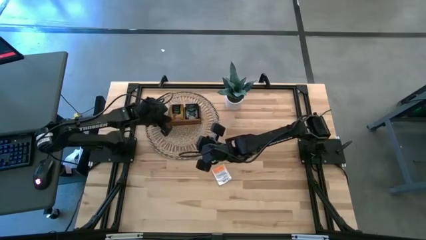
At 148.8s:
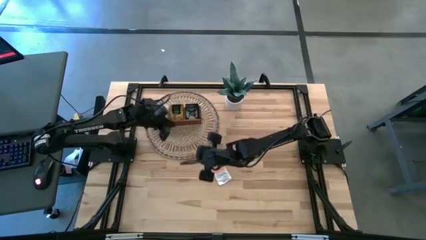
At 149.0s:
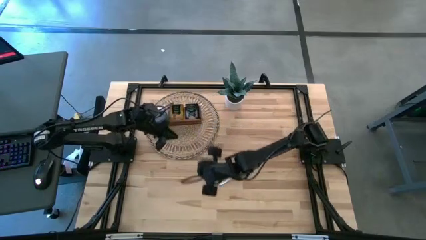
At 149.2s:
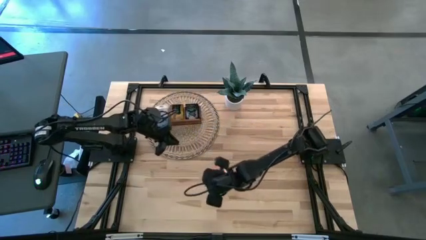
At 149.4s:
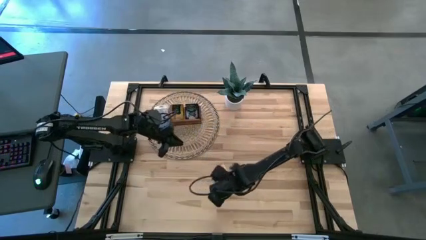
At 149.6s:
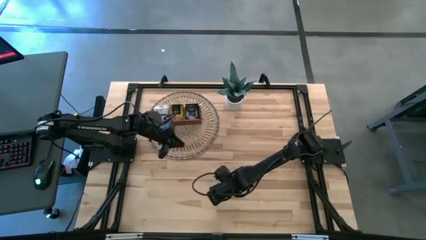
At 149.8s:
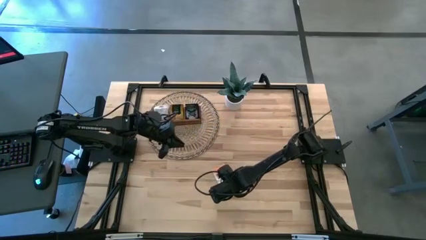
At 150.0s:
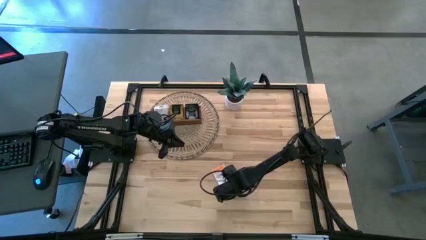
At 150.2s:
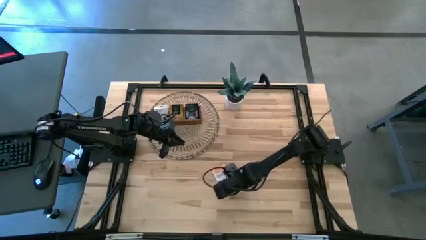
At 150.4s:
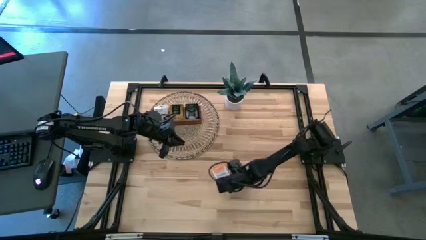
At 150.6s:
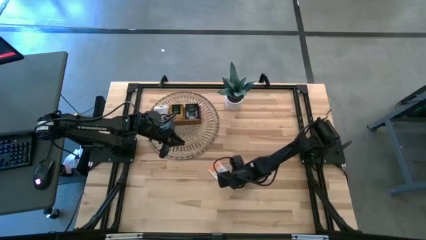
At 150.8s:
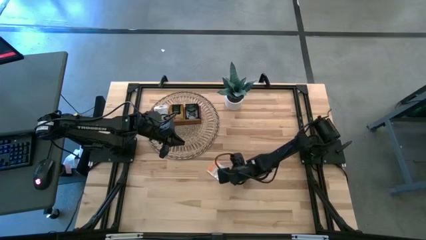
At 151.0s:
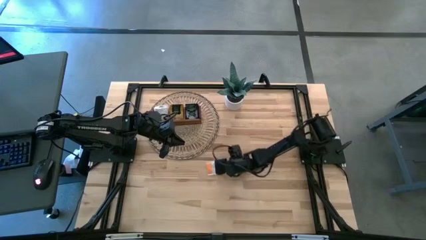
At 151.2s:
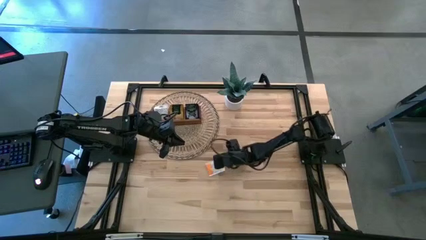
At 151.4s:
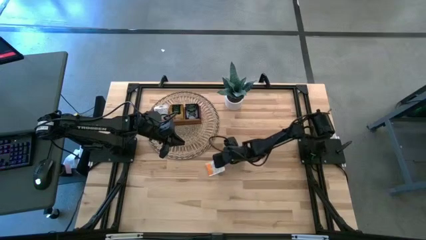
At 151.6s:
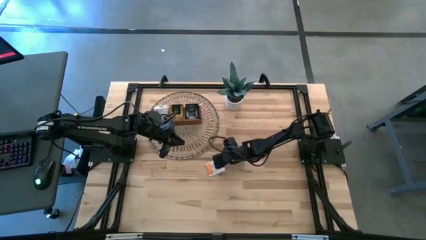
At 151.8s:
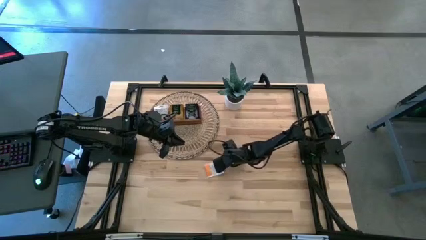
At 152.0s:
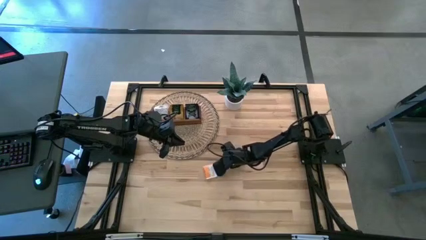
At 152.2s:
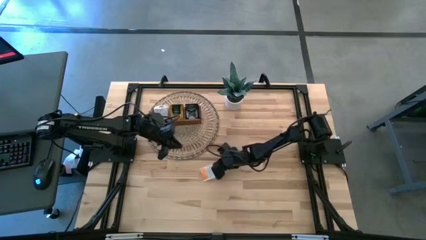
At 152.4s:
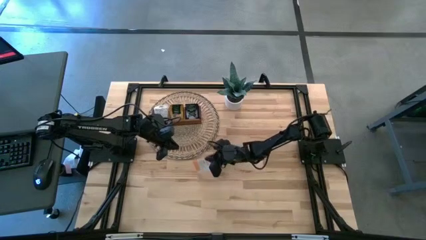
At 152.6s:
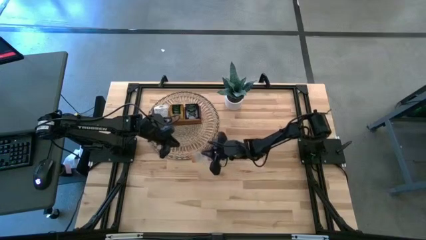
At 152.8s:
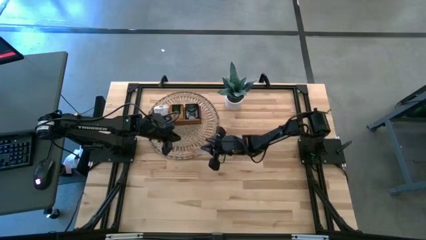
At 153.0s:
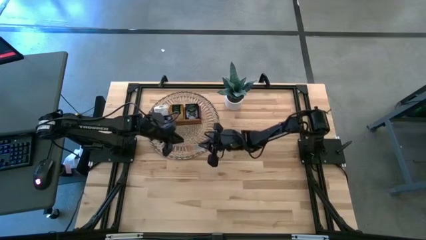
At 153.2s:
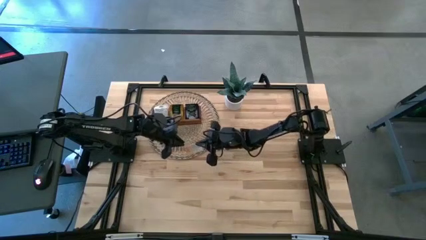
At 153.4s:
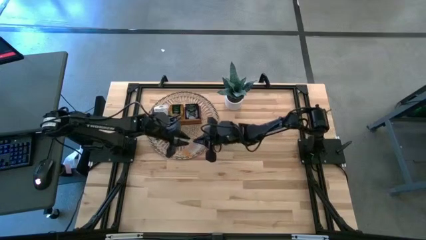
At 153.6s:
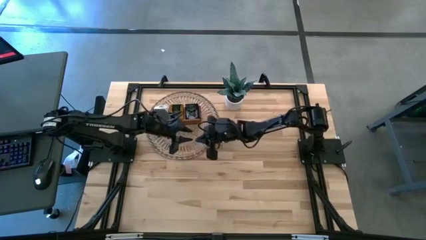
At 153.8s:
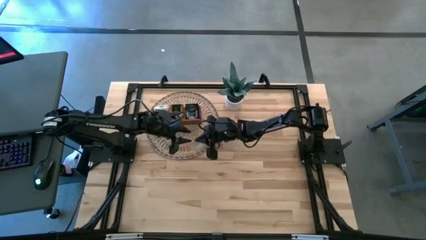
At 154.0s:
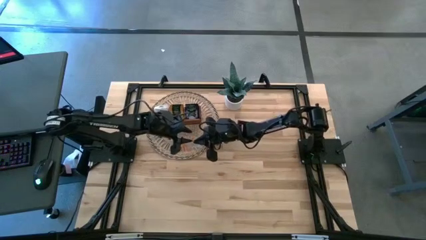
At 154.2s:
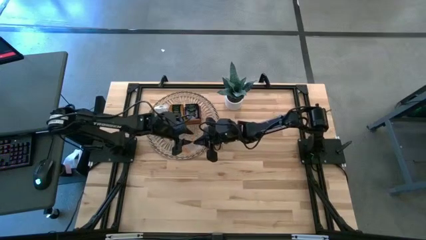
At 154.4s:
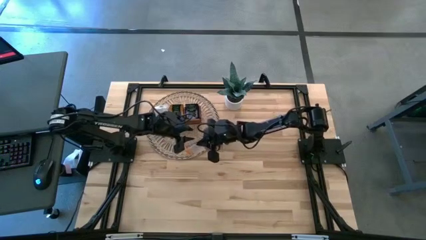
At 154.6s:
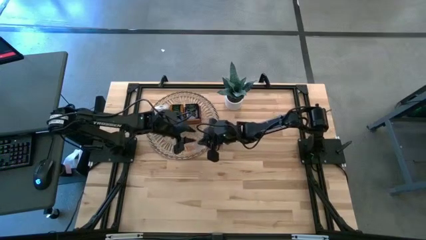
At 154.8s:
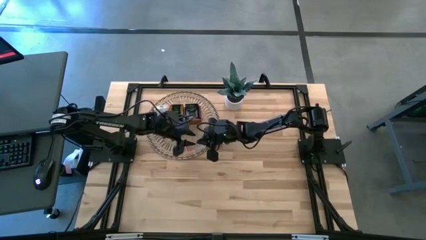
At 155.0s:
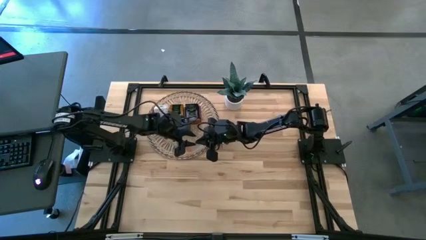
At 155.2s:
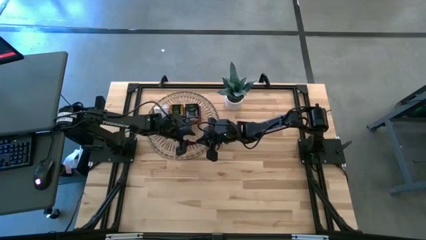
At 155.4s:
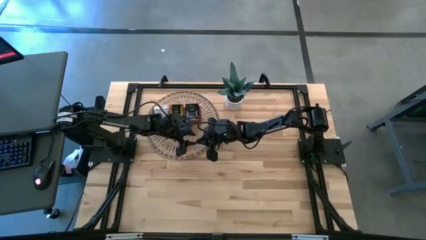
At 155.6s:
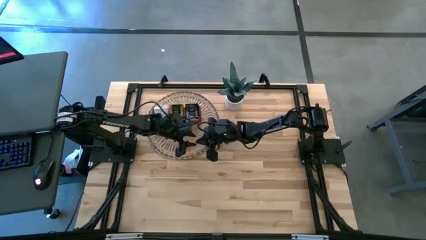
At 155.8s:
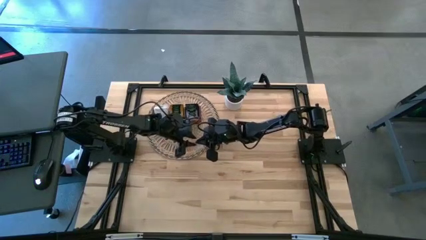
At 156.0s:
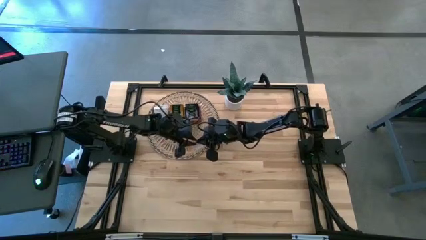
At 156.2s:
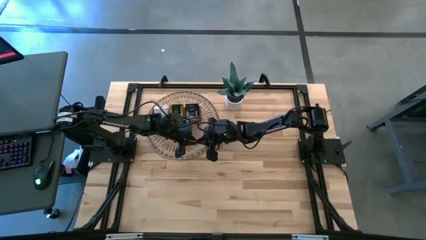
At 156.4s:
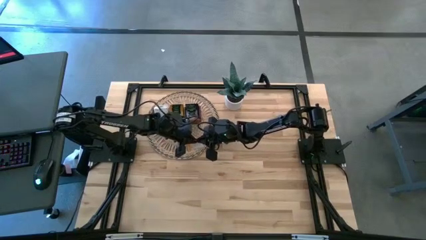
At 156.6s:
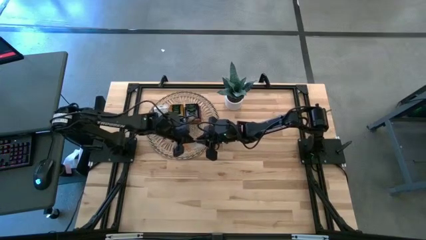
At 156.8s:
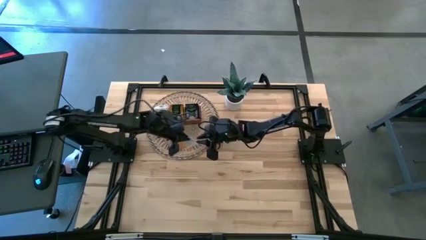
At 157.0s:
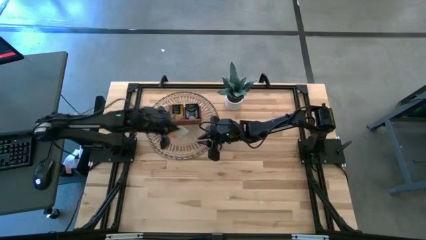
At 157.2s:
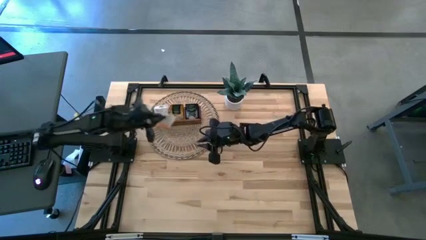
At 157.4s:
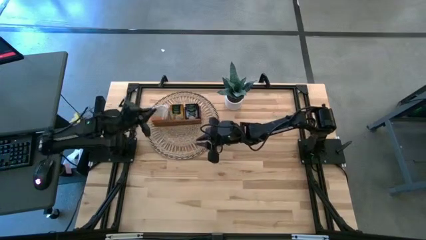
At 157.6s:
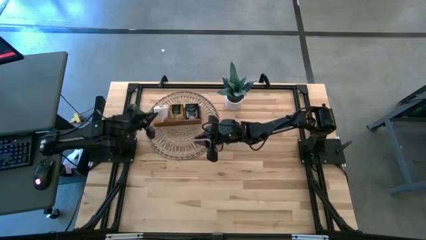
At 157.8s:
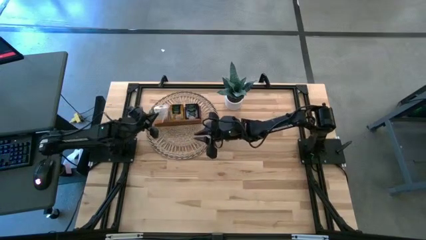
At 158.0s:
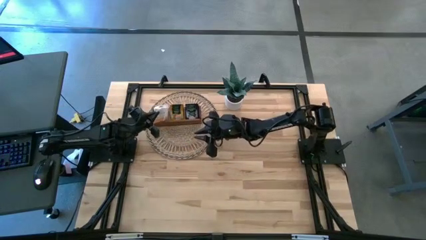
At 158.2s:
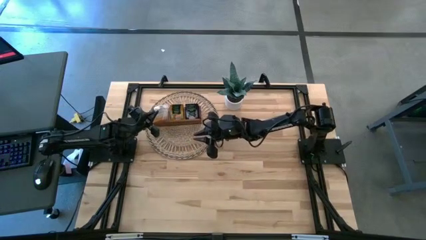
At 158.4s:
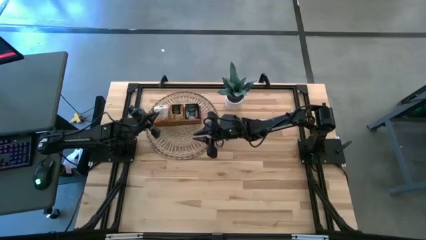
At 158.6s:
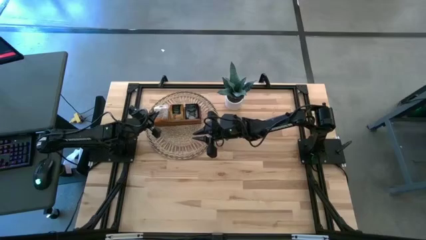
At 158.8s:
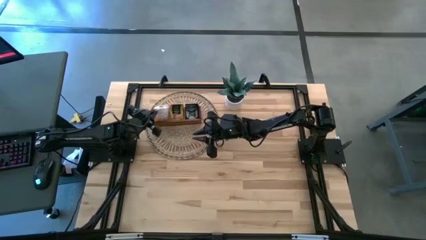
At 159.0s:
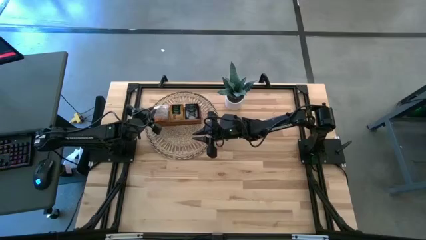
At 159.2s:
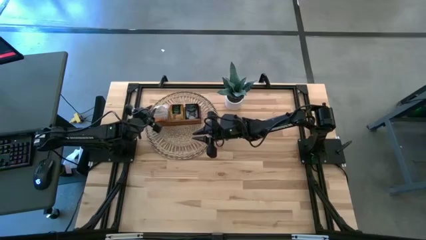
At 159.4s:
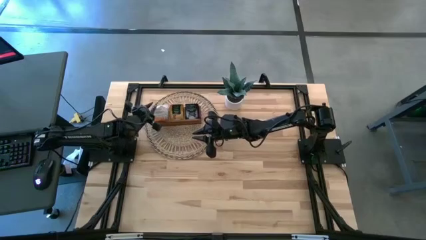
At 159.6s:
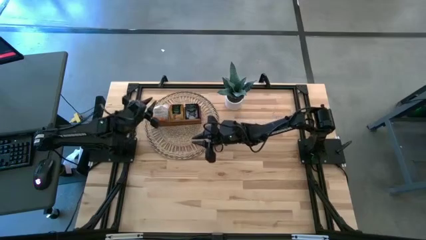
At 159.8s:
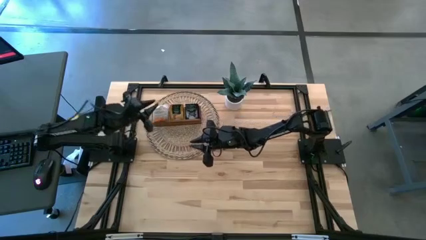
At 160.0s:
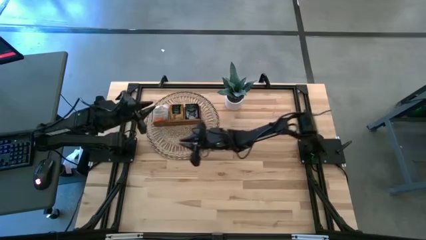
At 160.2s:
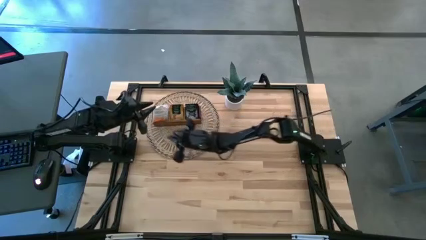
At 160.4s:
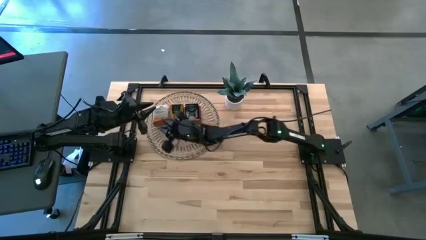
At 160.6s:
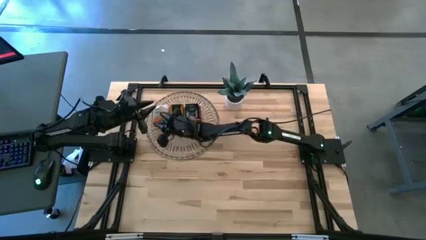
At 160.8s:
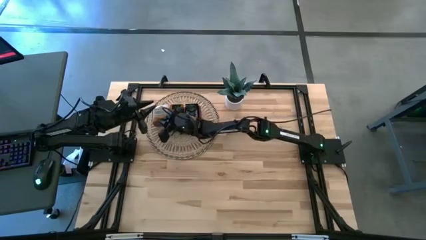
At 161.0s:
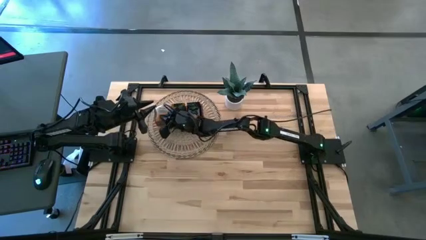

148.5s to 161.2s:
Task: Pick & Place Tea
Put the white tea bag into the left section of the wooden organizer
